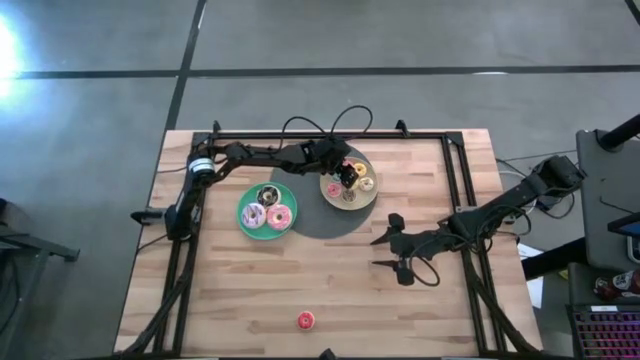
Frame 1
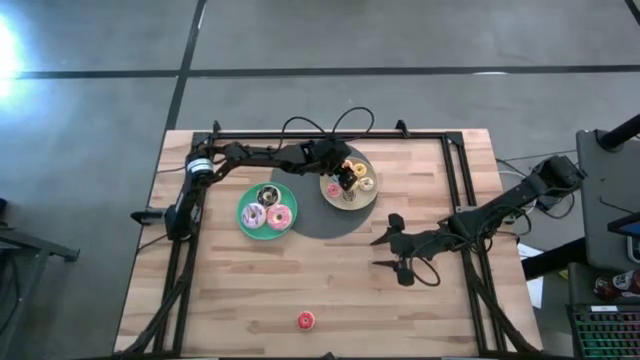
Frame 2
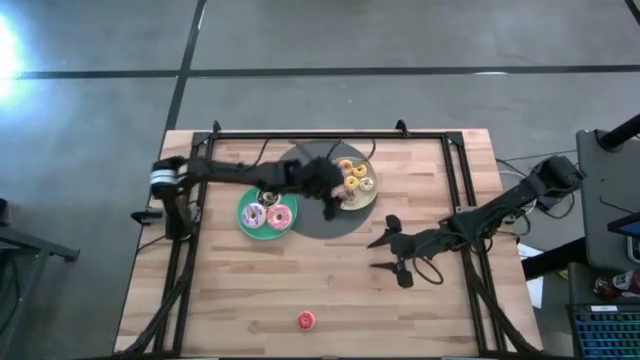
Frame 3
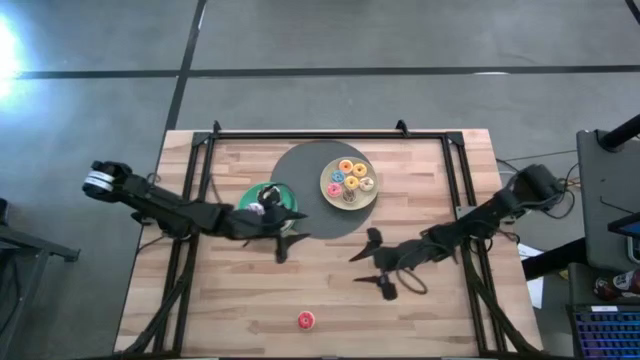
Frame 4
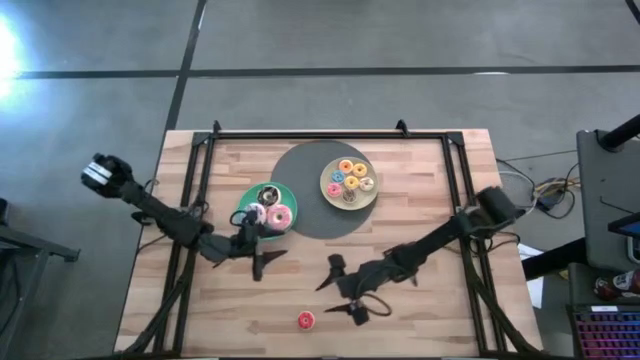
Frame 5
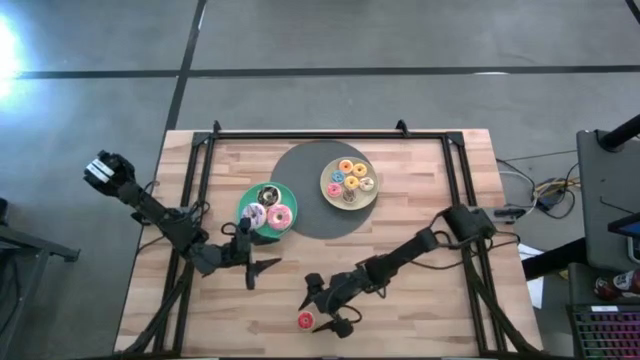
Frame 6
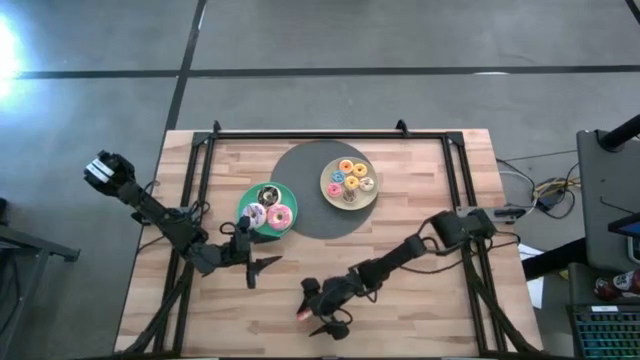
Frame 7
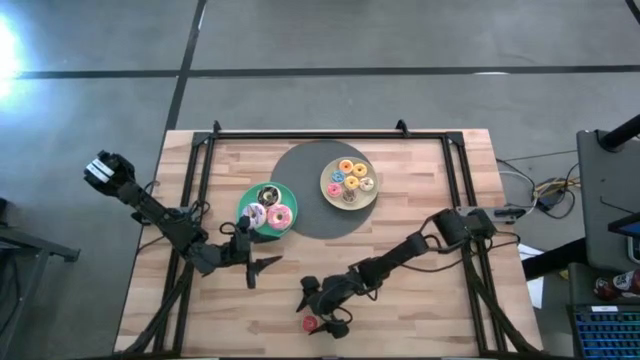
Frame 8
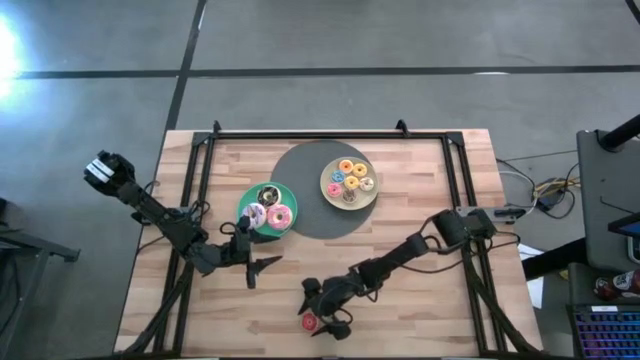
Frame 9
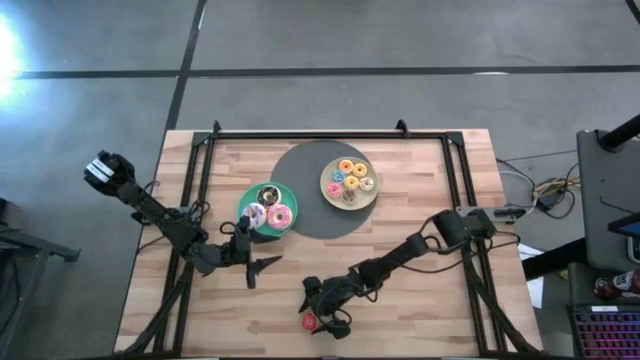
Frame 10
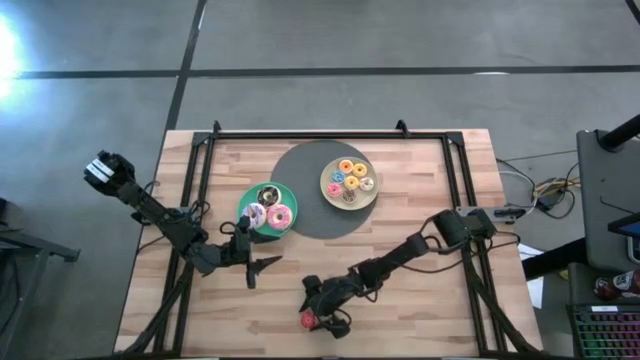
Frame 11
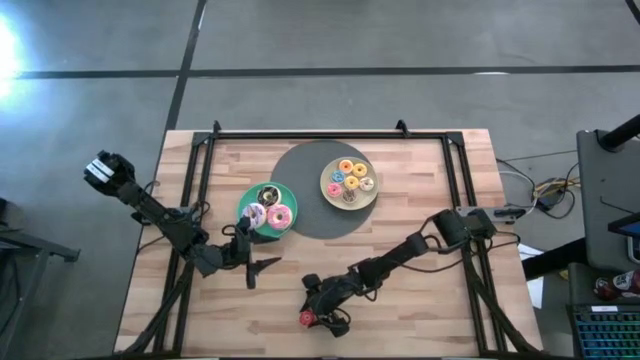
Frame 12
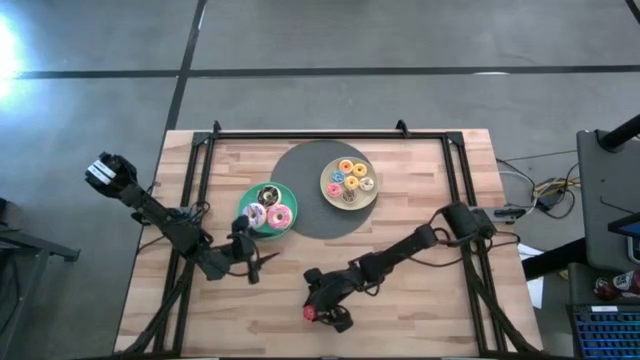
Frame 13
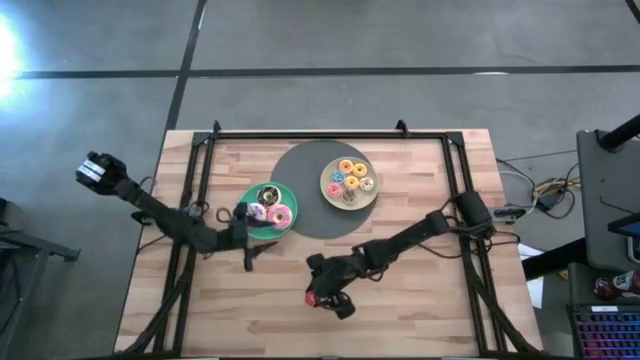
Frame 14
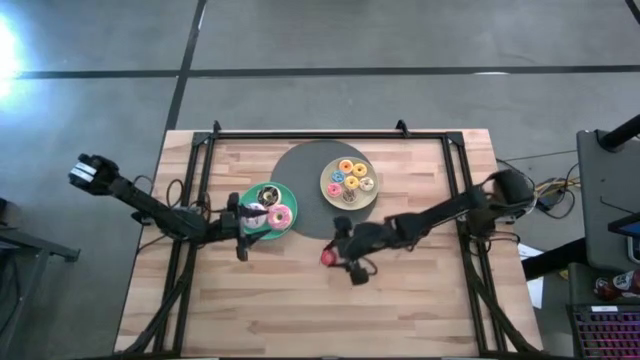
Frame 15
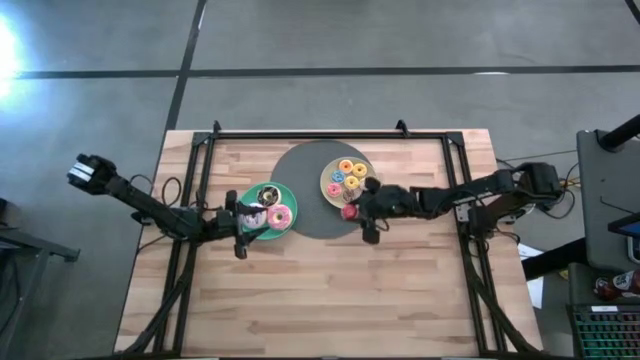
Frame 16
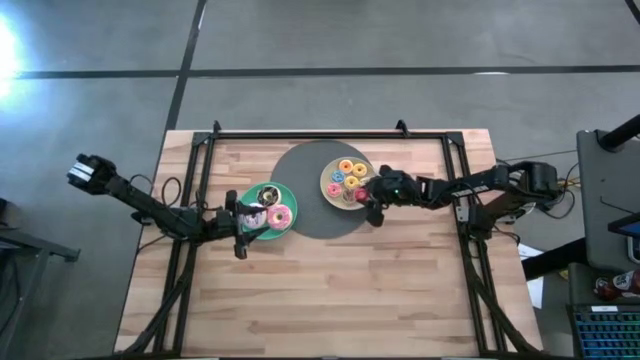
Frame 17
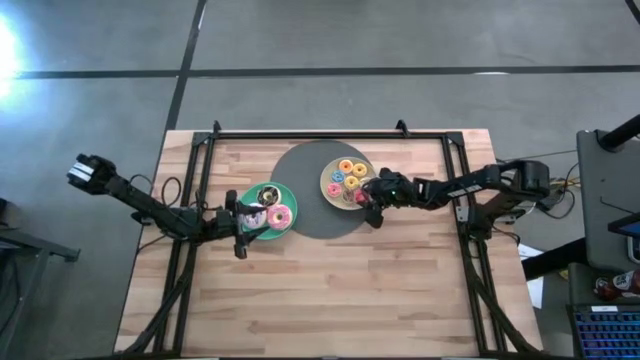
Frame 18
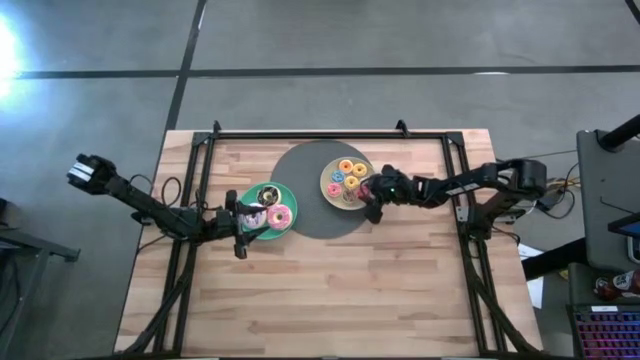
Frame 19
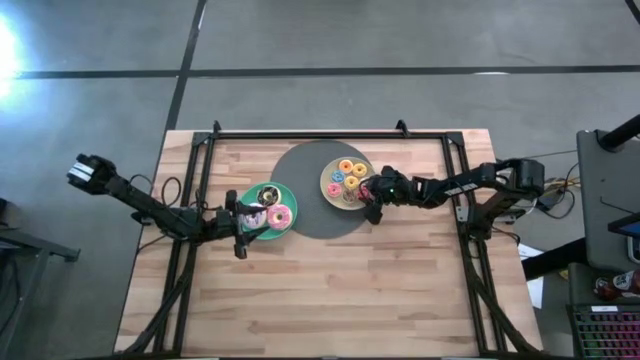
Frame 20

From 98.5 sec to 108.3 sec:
Task: Pick & Place donuts
Put the small orange donut on the brown plate

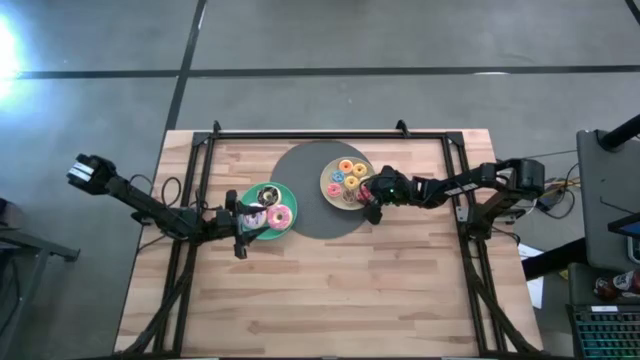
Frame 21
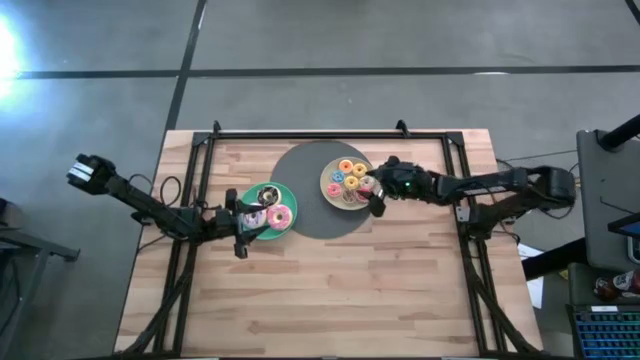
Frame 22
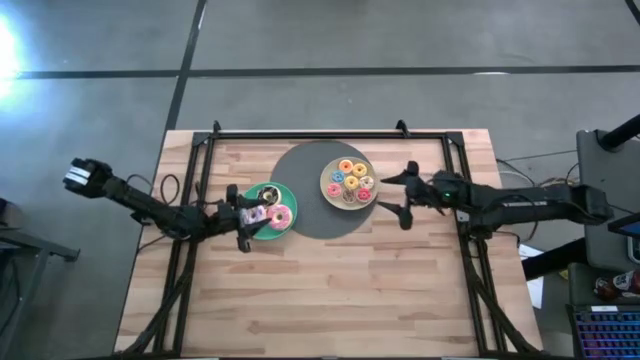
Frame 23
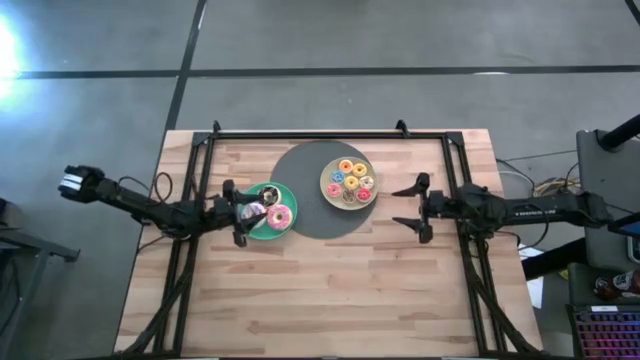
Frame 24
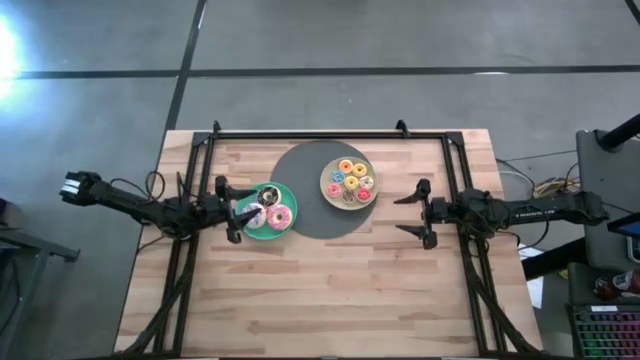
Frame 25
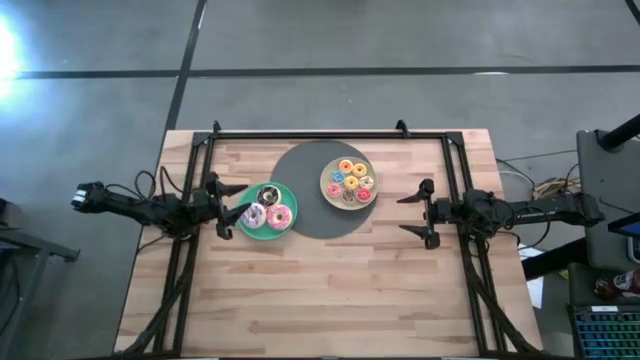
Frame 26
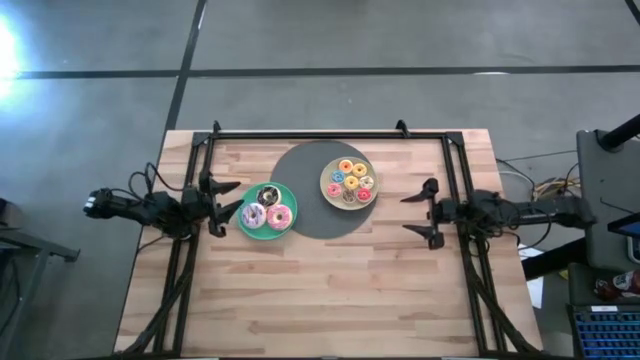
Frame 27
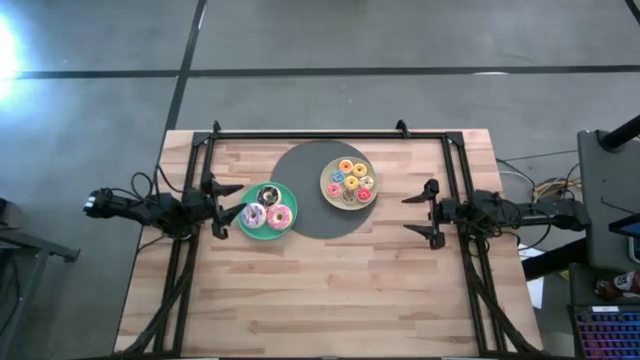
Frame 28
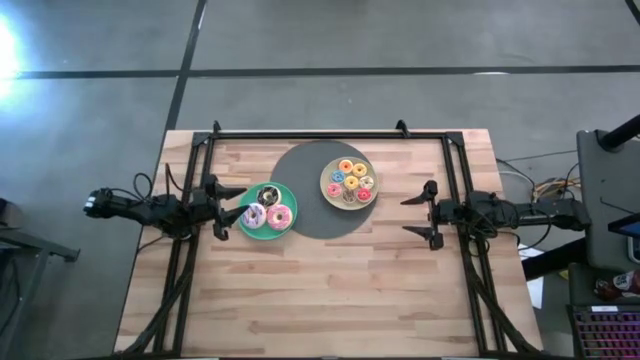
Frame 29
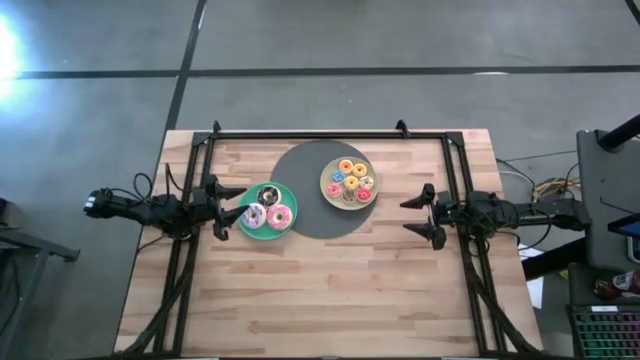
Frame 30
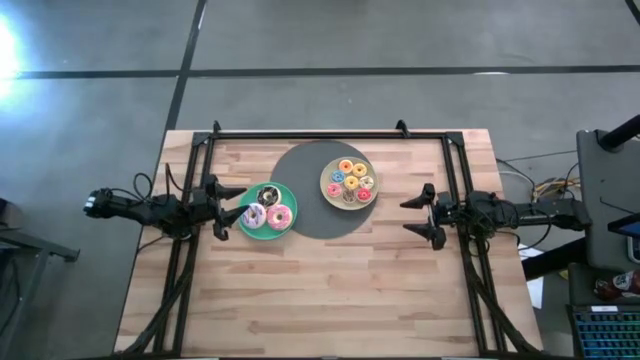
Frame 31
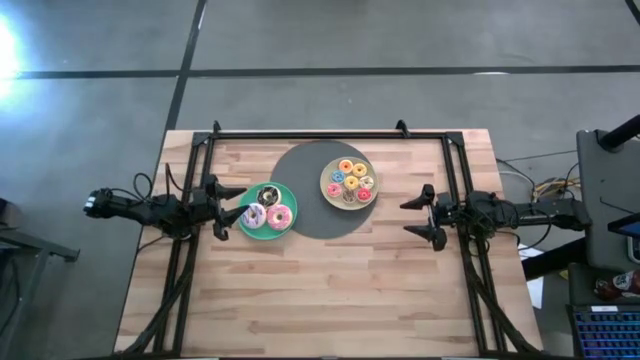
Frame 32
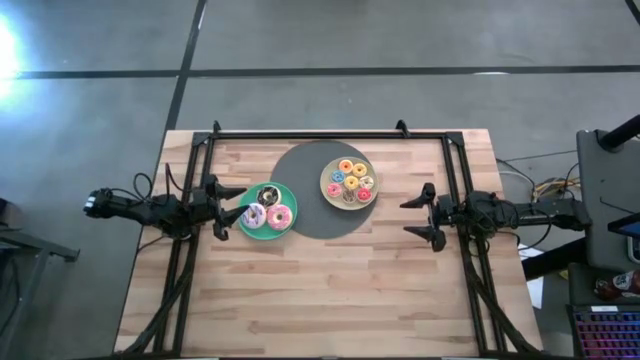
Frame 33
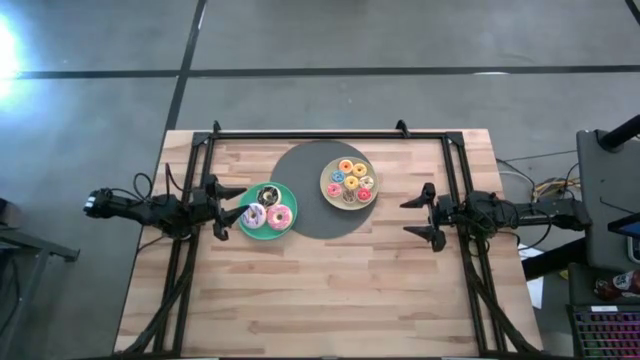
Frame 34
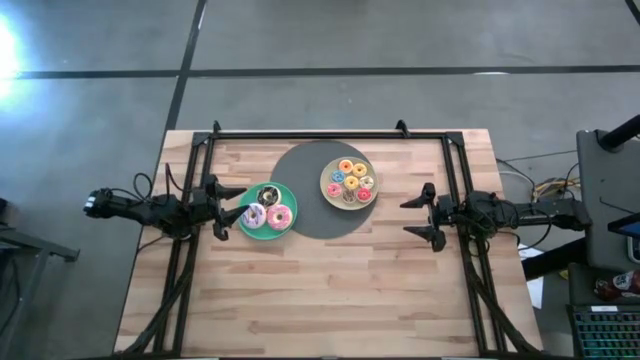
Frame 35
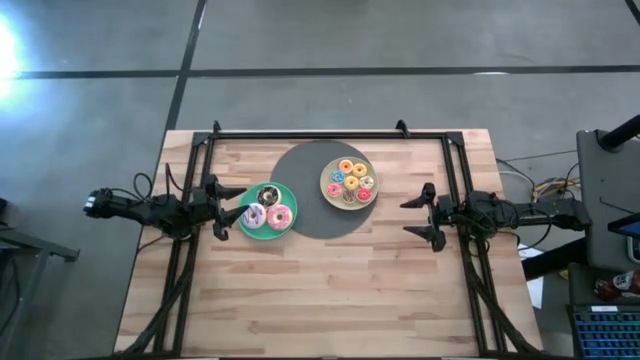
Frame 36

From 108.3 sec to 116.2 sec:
Return to Home Position

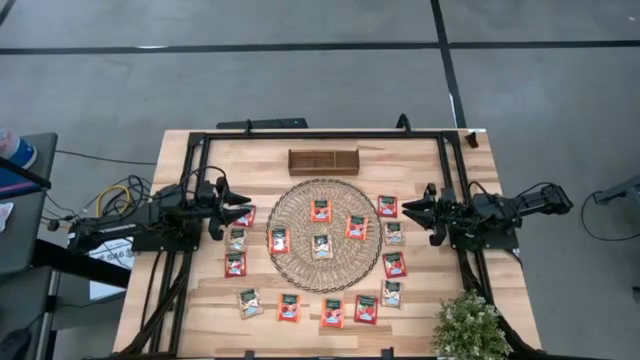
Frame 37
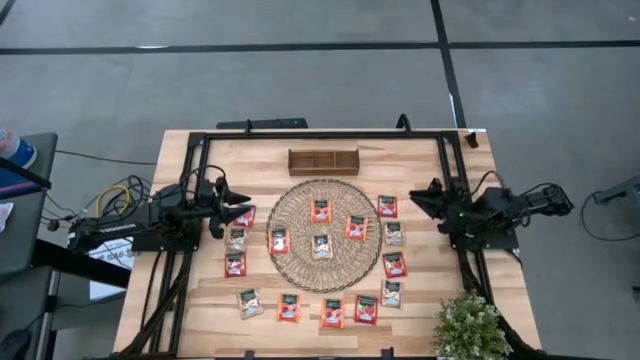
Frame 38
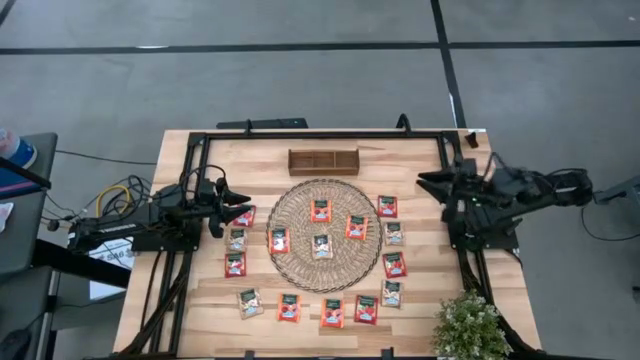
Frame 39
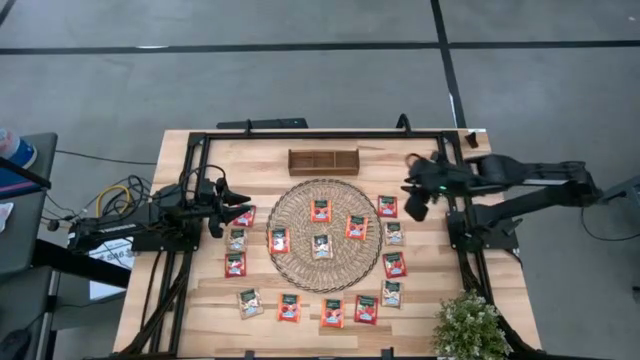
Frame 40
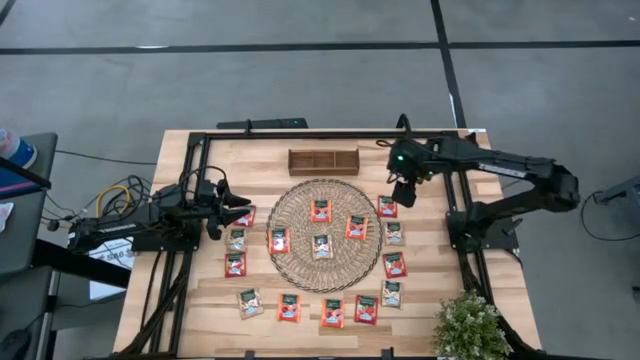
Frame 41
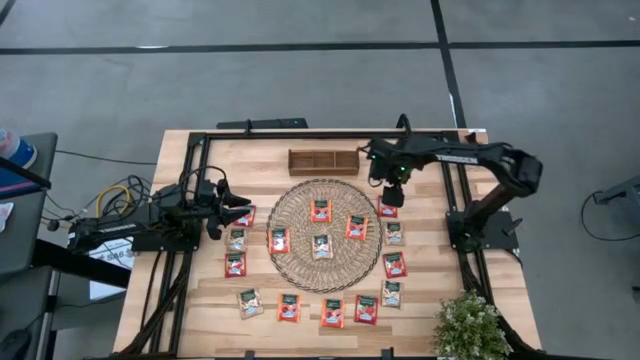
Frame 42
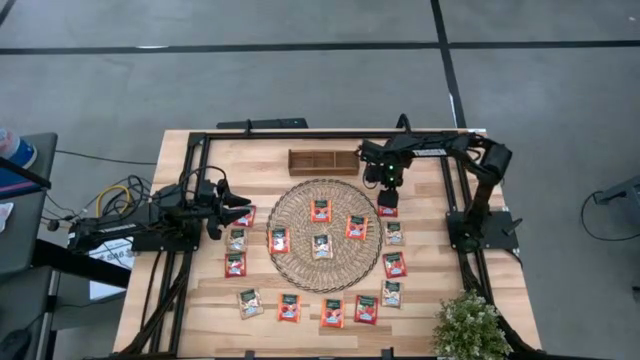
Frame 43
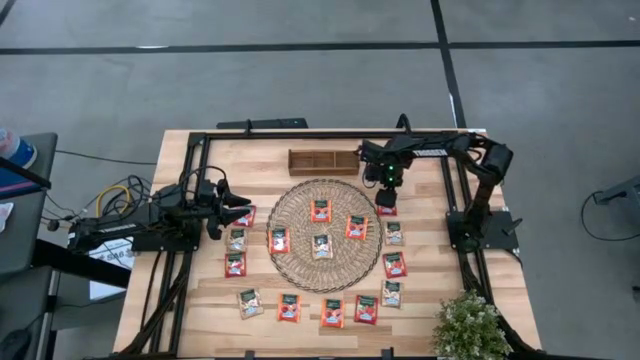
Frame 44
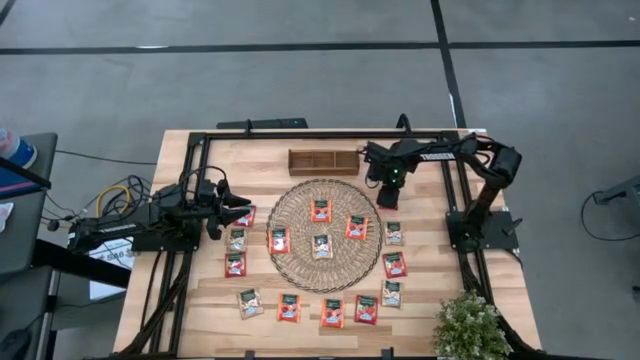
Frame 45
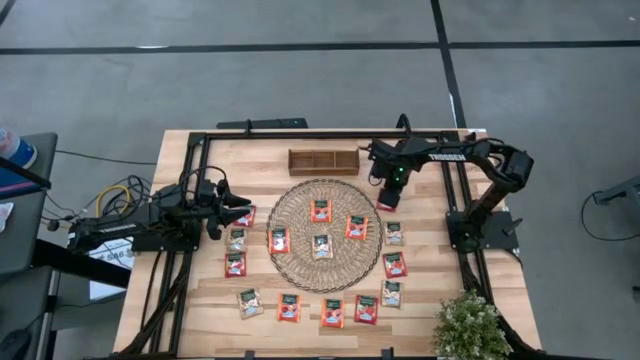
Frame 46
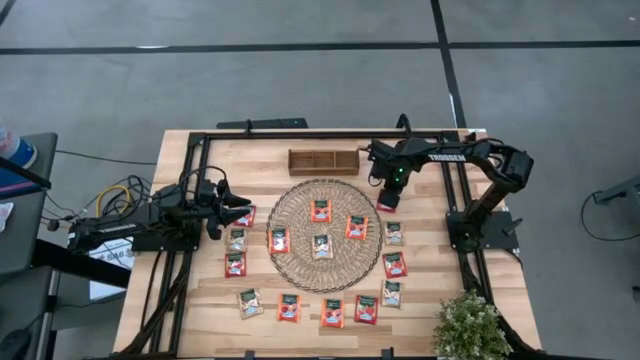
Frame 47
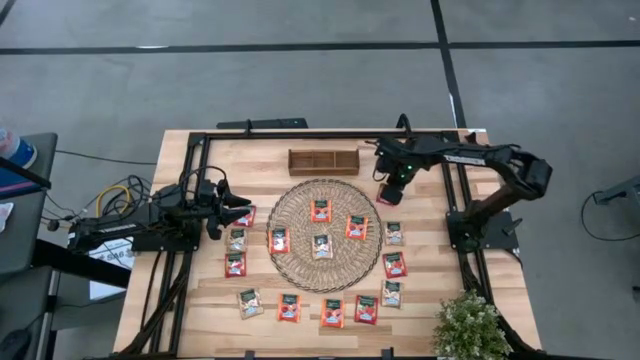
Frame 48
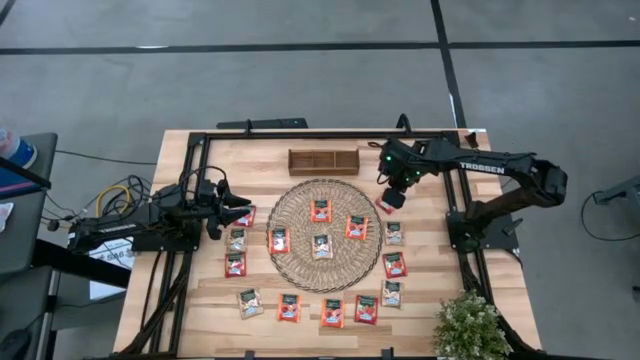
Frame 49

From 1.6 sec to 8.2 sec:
Task: Pick & Place Tea
Put the red tea bag into the right section of the wooden organizer
